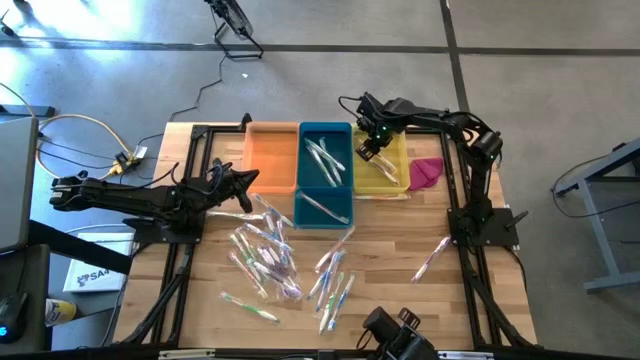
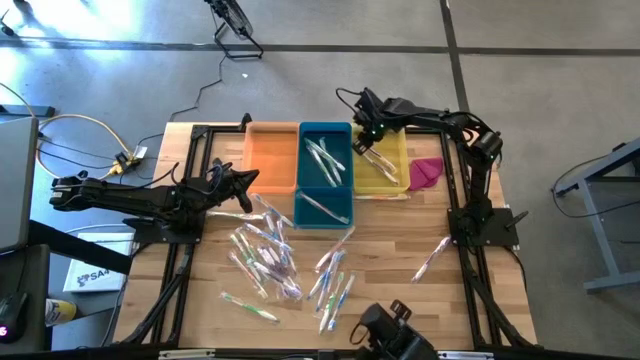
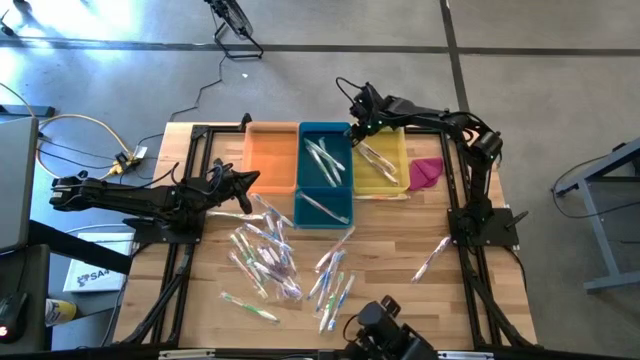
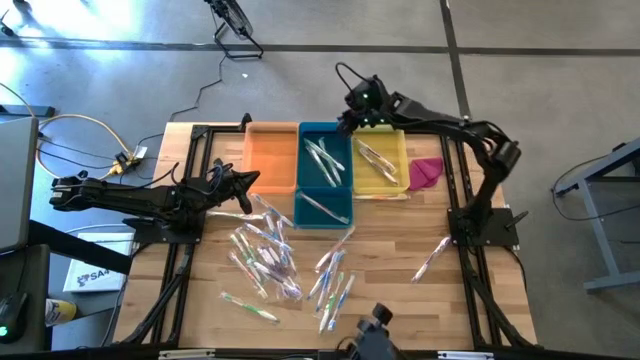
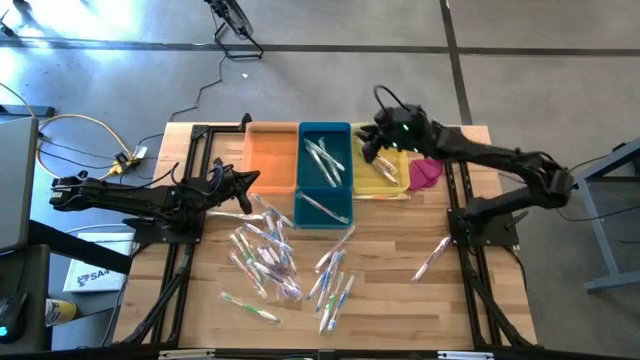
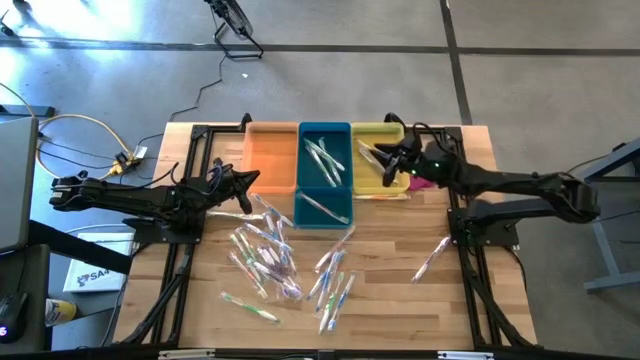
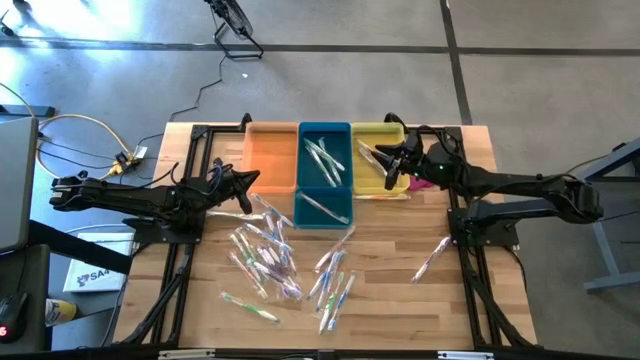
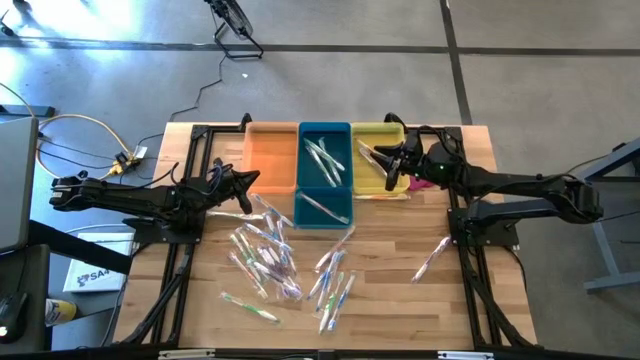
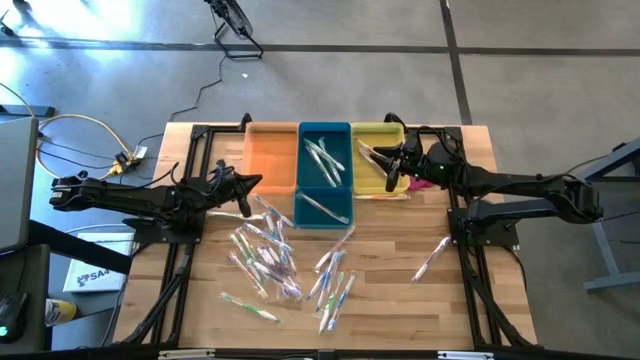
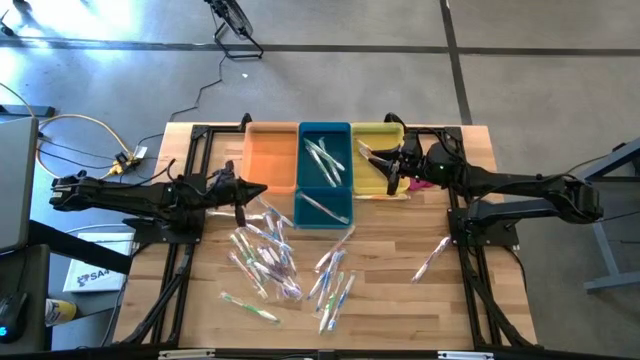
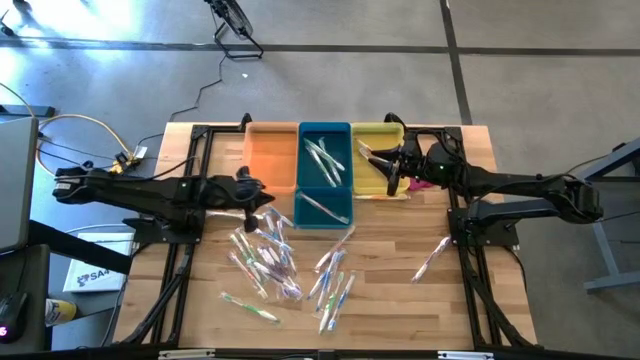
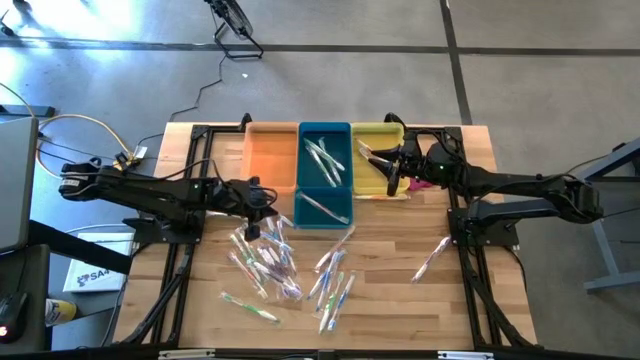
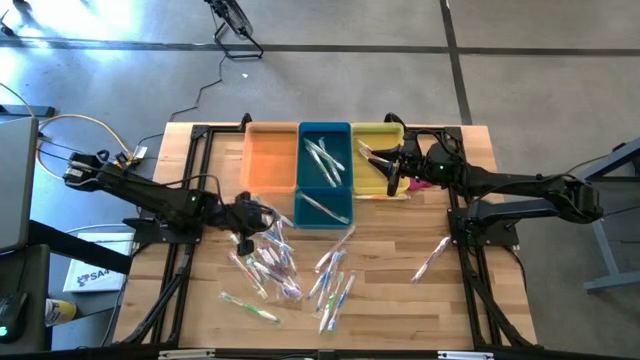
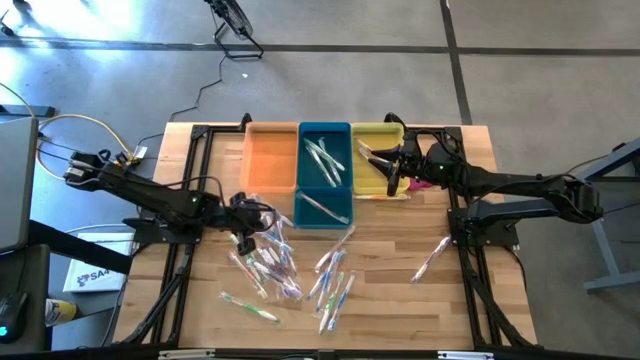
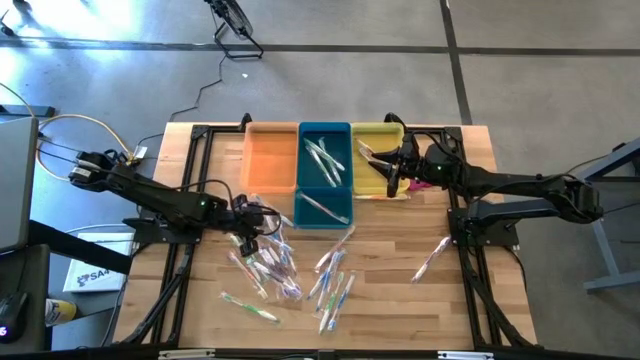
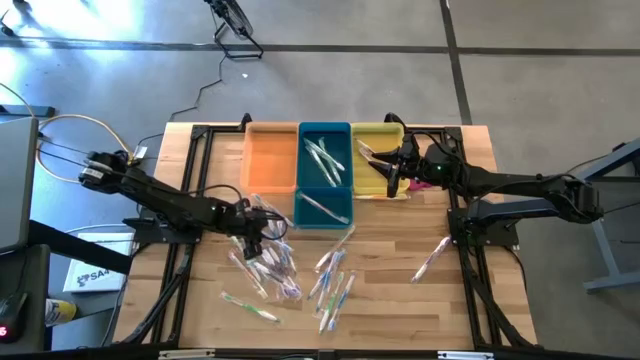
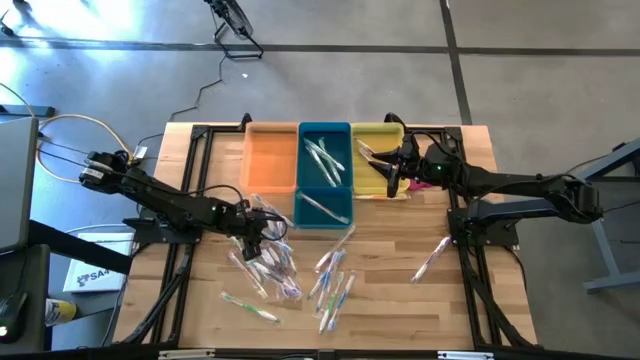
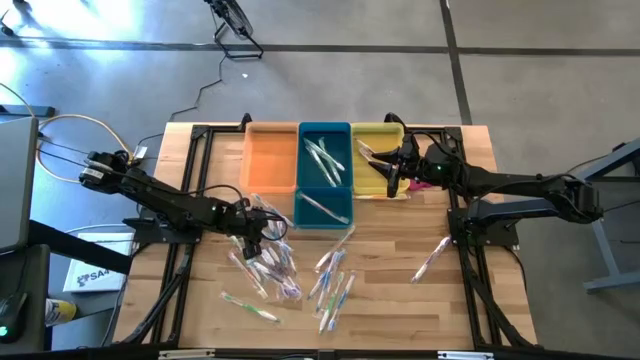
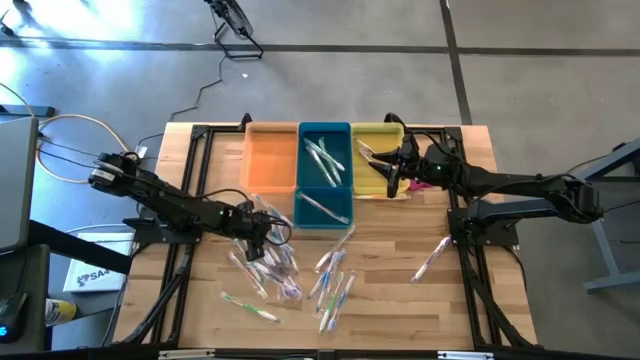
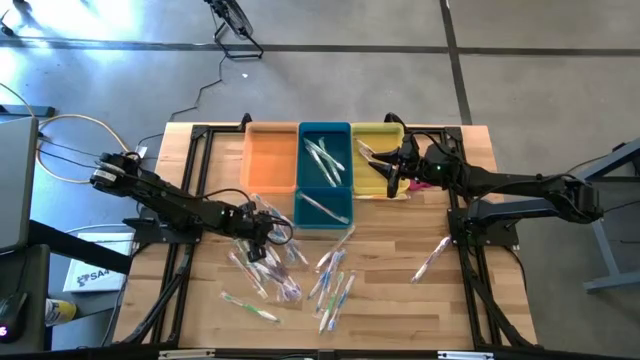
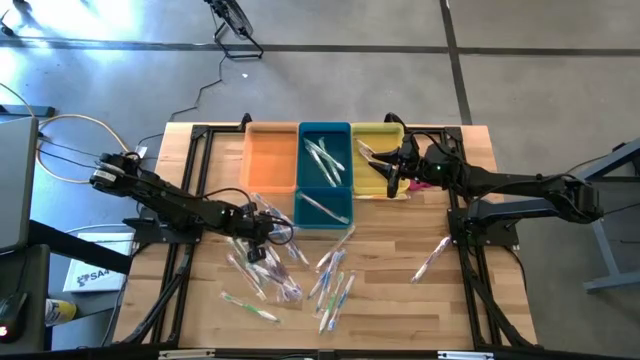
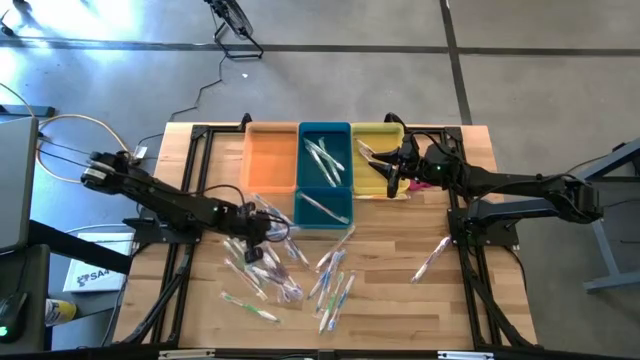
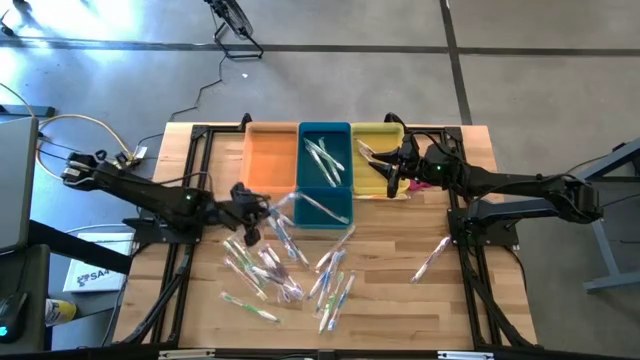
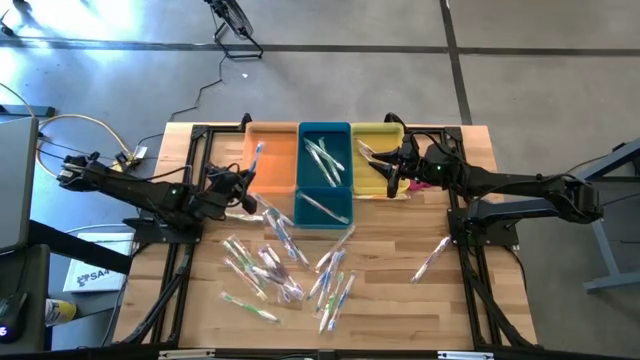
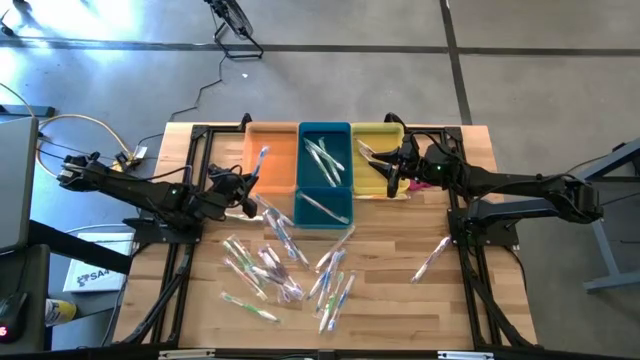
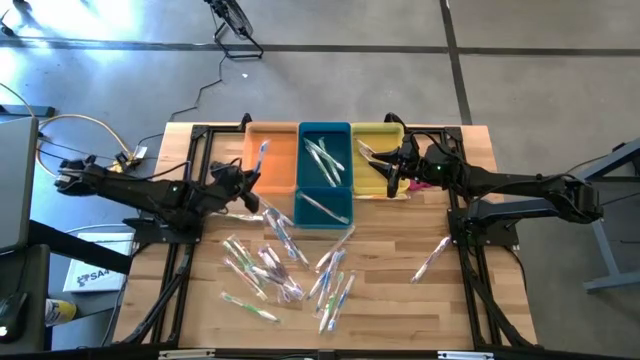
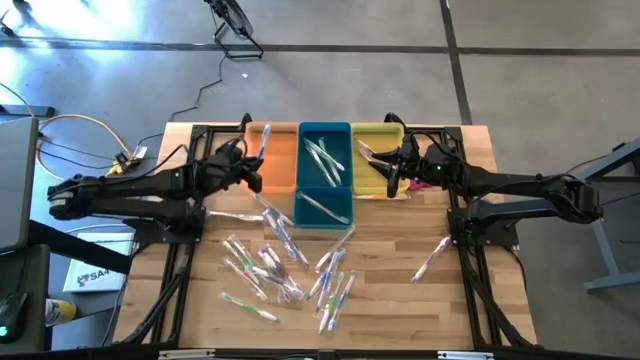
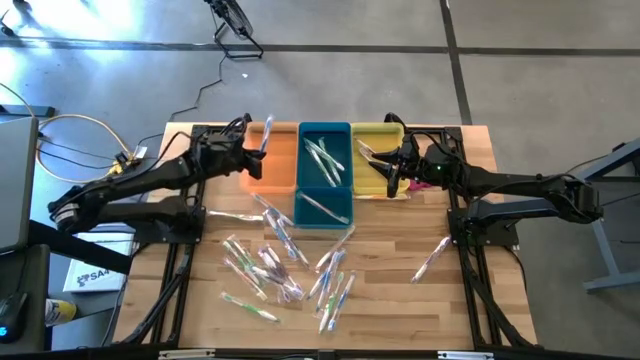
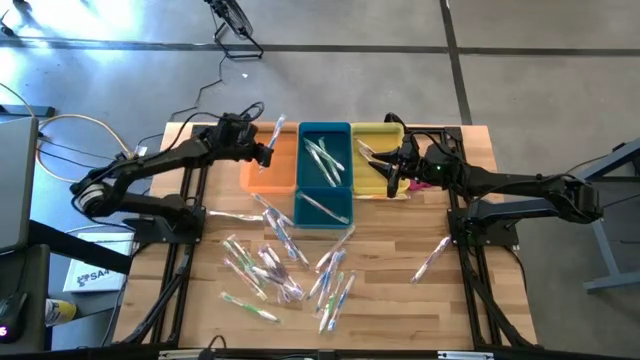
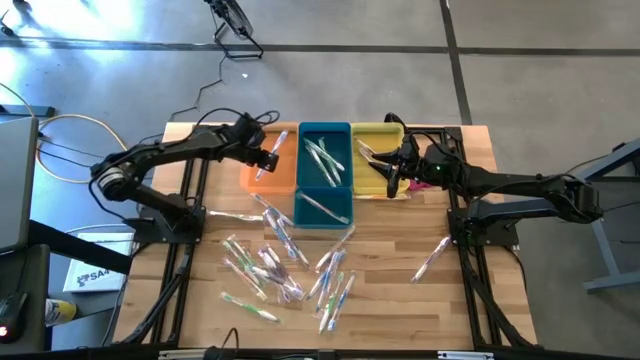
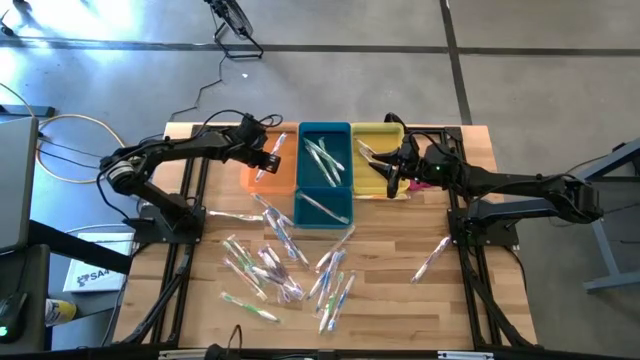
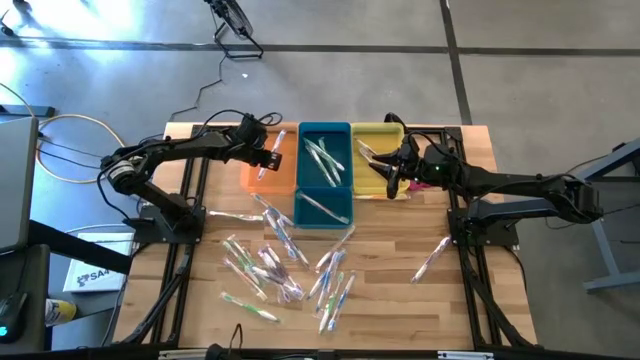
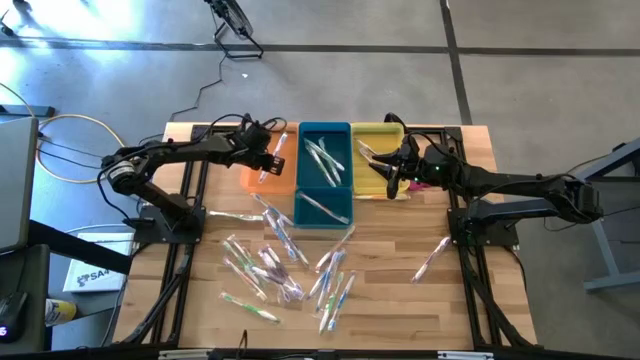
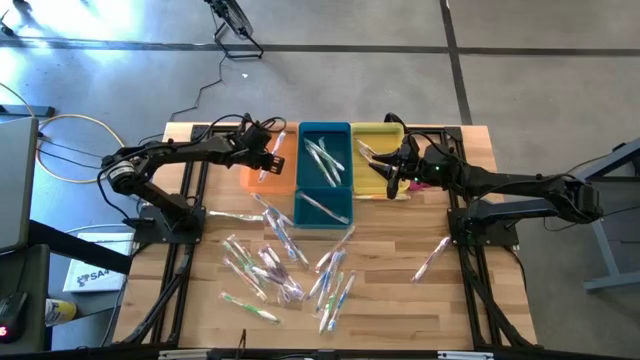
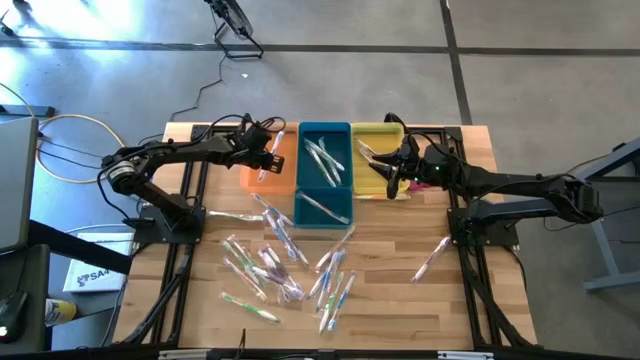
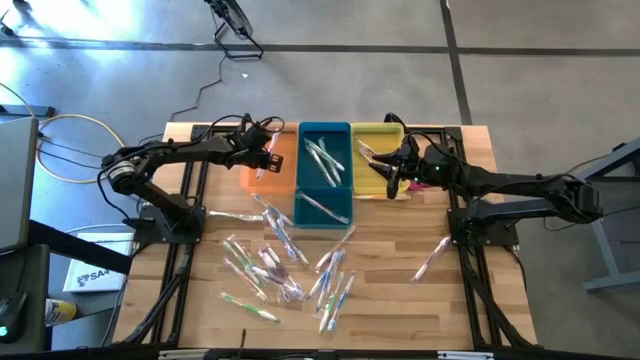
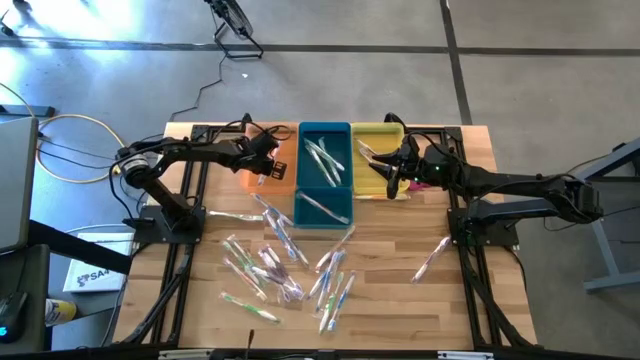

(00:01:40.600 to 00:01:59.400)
Task: Pick & Place Toothbrushes
Put the blue toothbrush into the orange bin

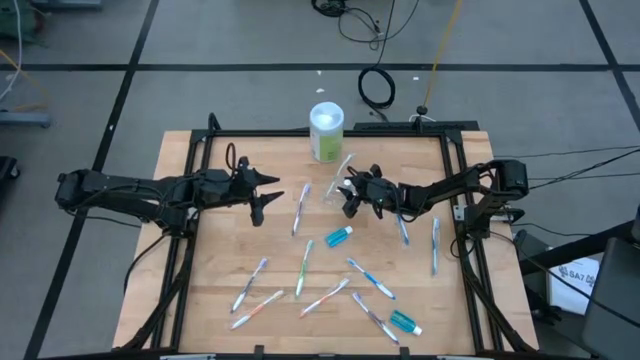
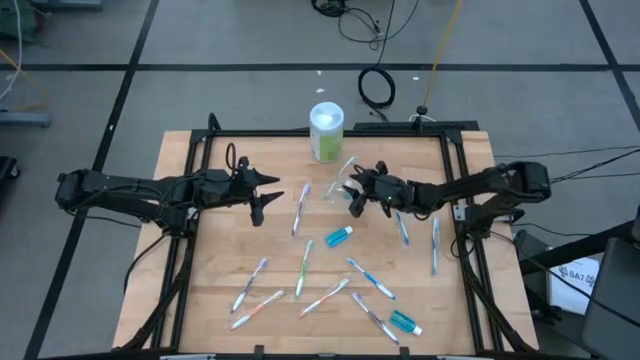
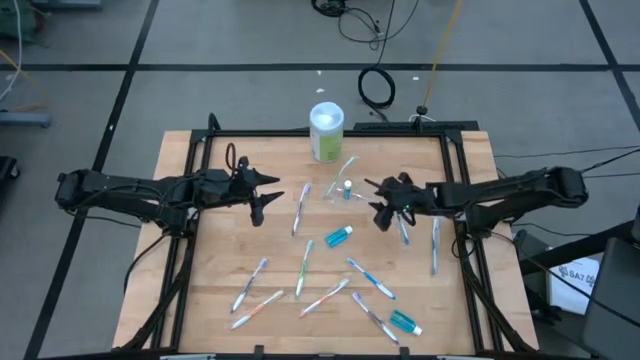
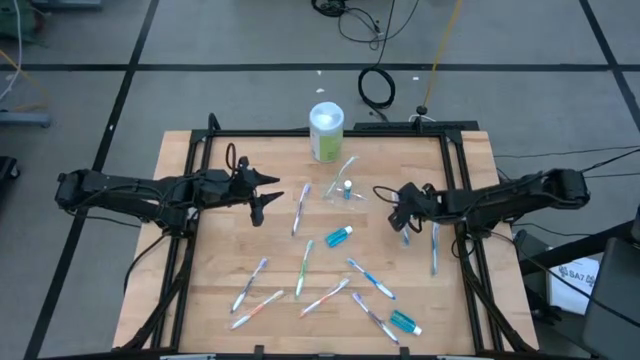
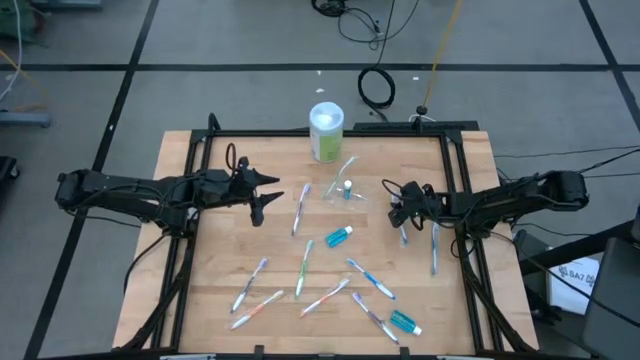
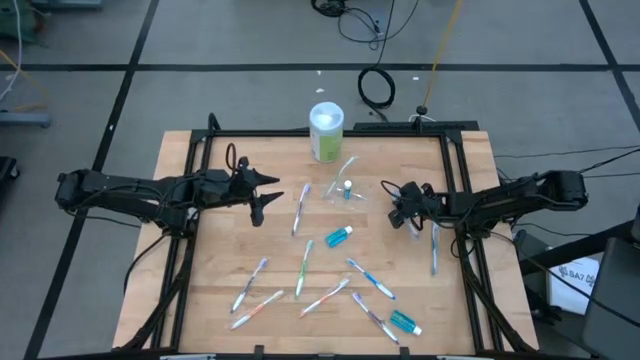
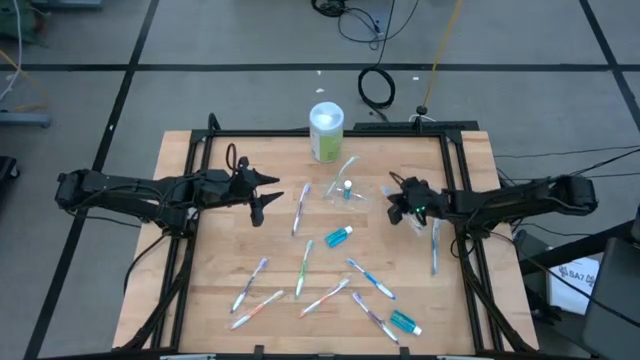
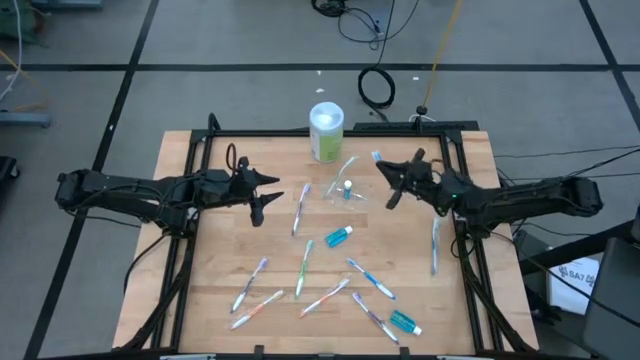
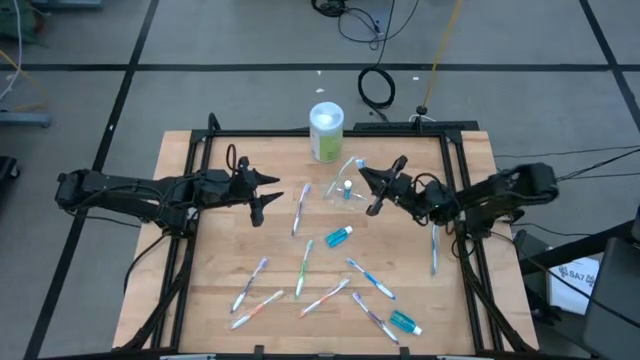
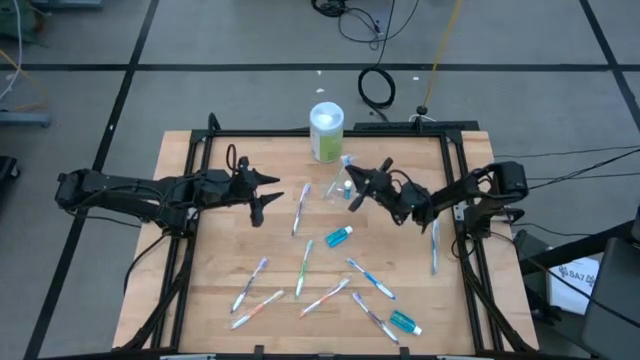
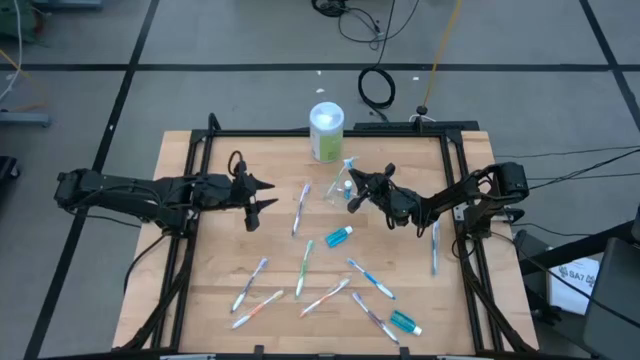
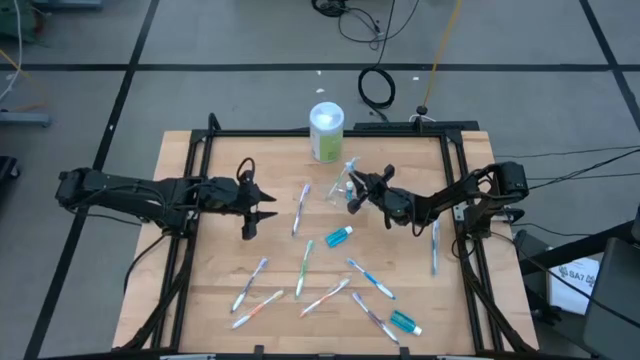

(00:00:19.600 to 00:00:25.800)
Task: Pick & Place toothbrushing station
Put the top middle blue toothbrush into the transparent organizer
